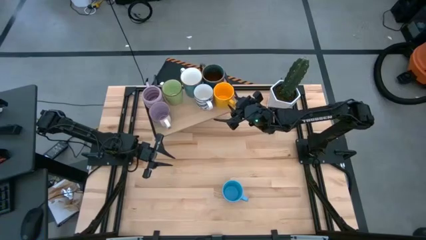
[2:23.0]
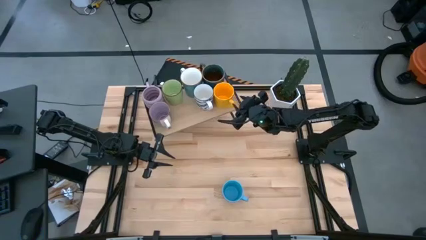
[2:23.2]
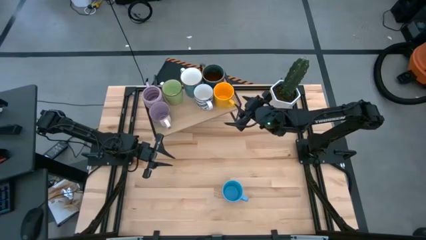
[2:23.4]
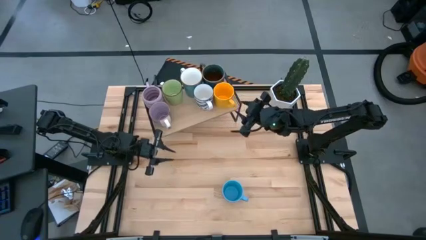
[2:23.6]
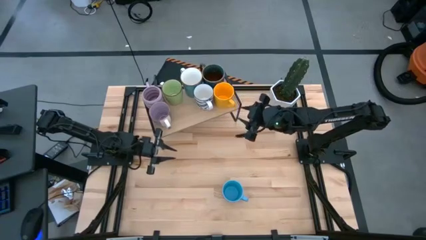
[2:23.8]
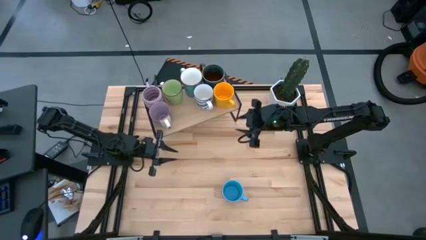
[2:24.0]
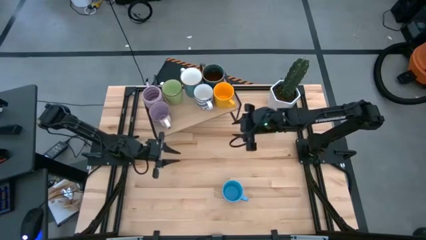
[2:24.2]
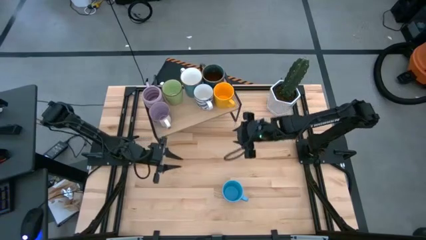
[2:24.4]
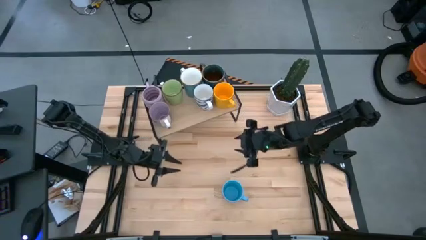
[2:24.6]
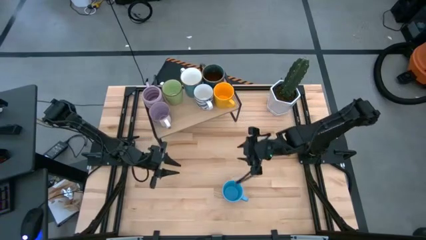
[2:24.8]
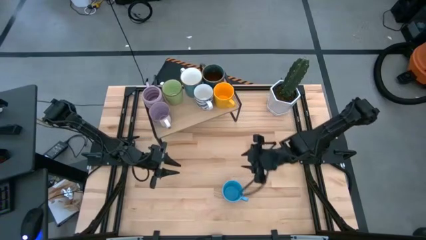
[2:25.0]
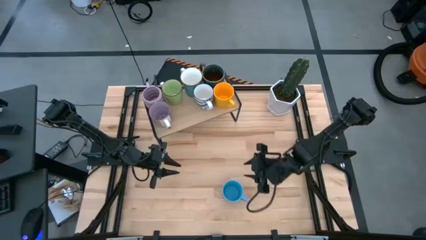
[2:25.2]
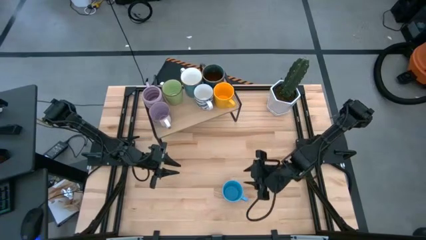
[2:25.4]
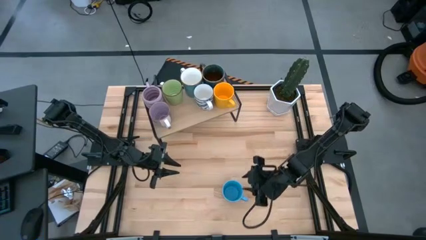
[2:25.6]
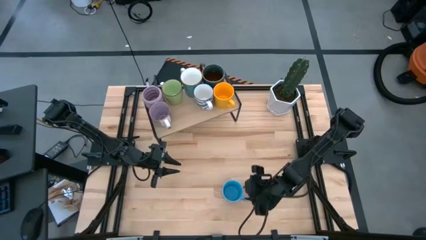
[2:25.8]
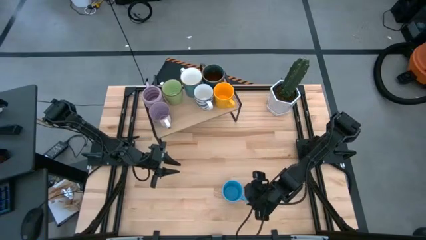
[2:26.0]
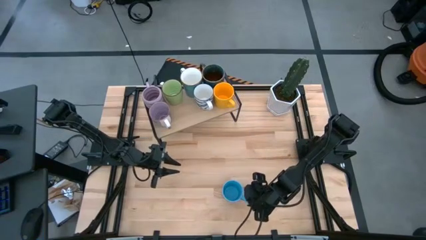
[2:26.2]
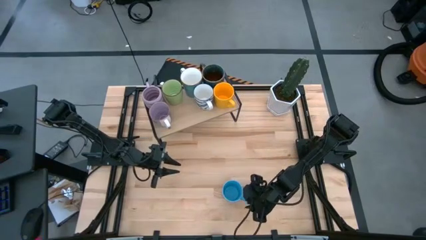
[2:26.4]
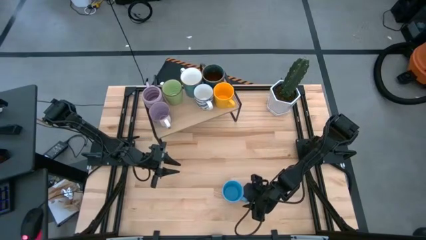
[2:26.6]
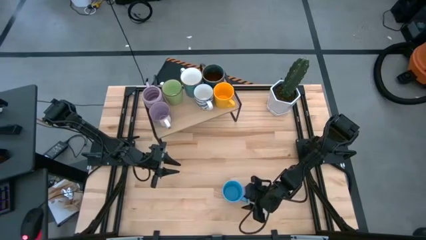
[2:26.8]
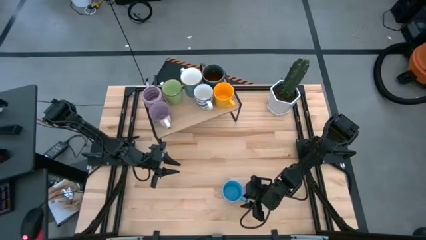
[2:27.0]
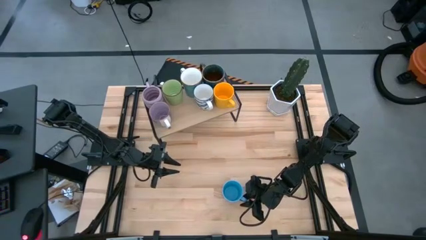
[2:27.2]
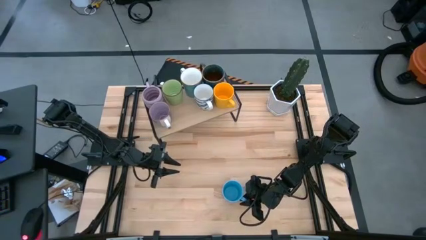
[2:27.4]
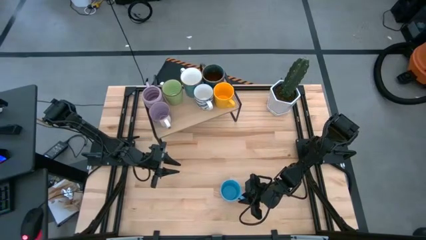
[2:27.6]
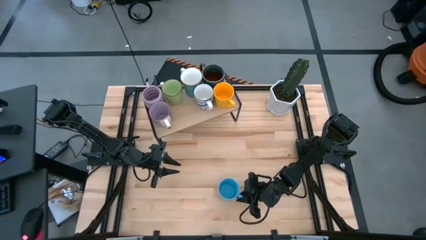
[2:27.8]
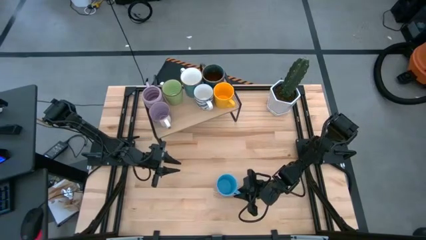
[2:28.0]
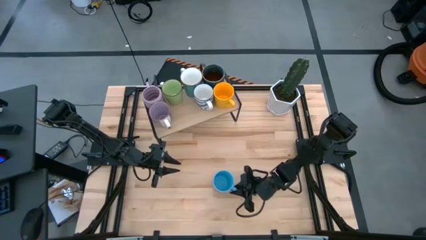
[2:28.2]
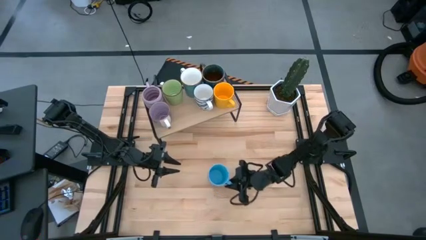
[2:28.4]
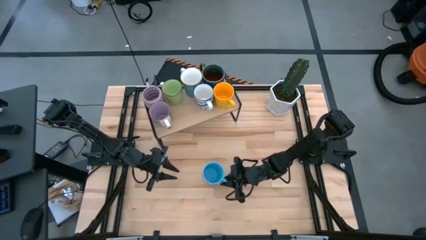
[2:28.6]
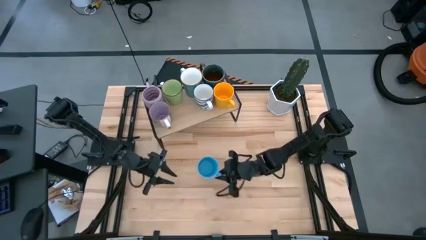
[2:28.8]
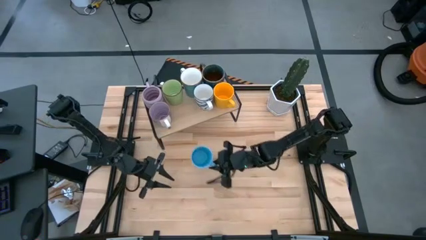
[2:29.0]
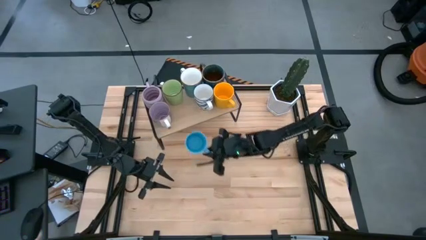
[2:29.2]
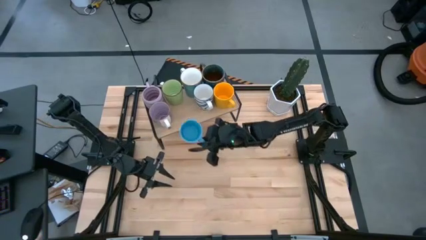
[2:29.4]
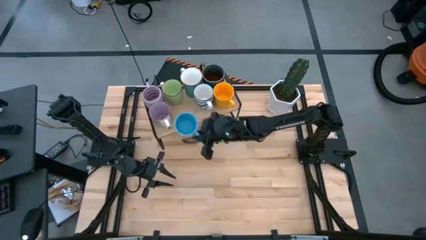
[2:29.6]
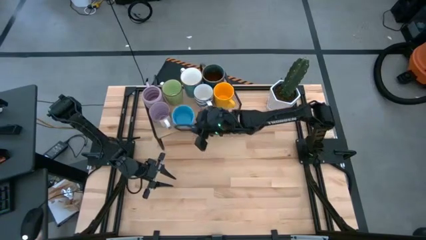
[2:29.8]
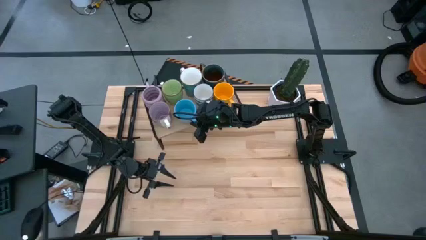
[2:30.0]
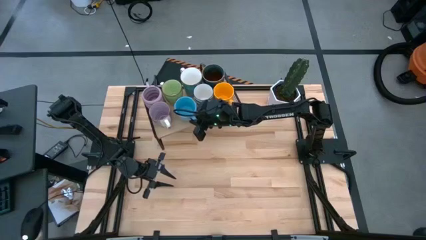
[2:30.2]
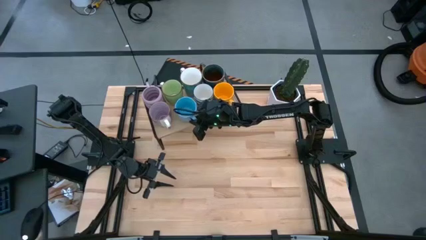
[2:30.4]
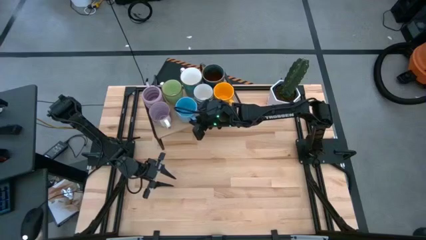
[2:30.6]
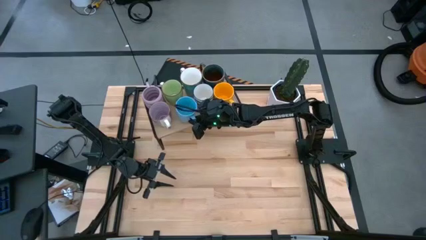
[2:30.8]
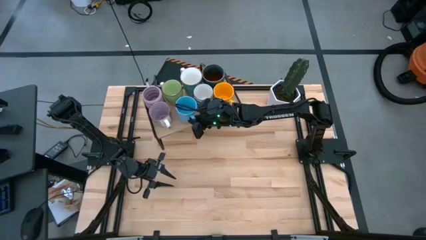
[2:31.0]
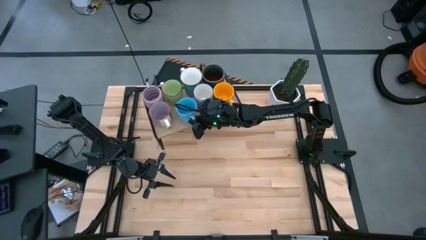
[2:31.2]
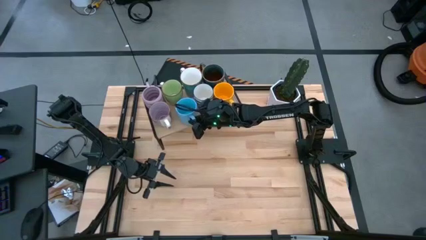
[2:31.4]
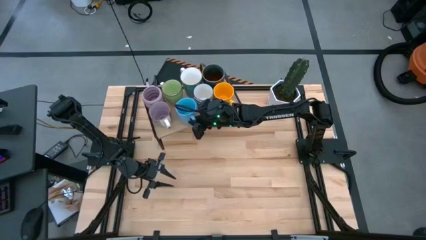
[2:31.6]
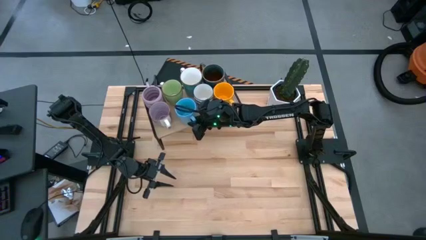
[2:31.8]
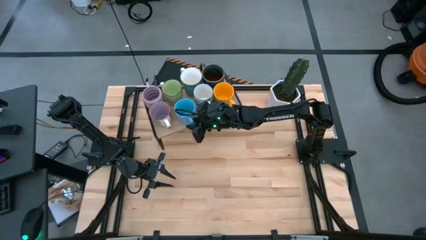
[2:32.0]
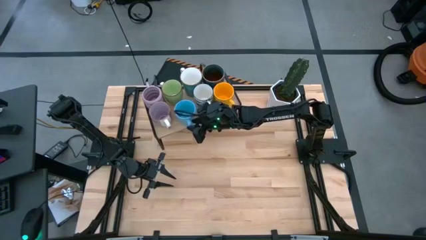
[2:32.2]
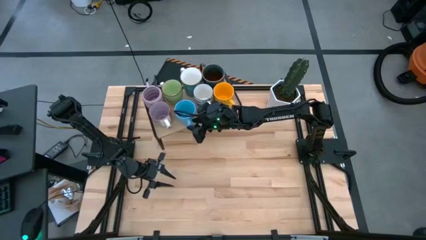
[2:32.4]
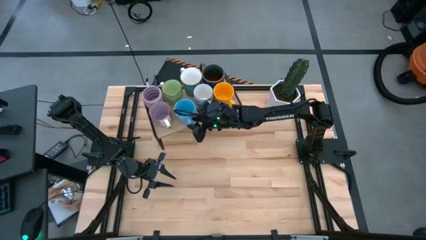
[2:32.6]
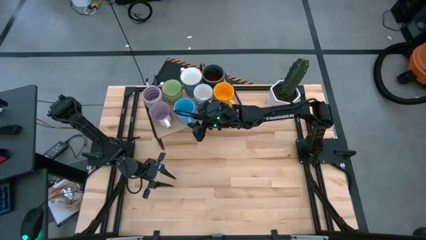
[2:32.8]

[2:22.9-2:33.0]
Task: Place coffee mugs
Put the blue mug on the shelf

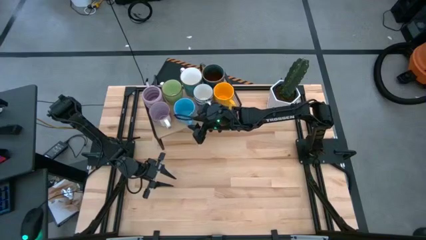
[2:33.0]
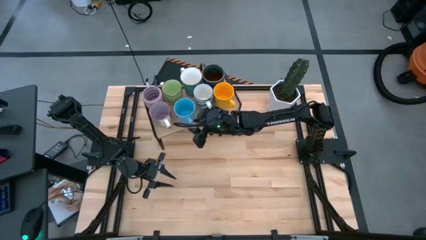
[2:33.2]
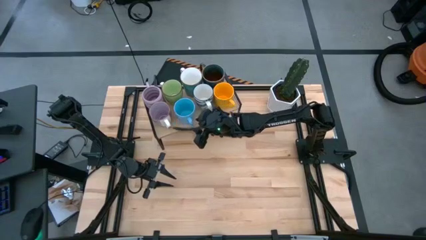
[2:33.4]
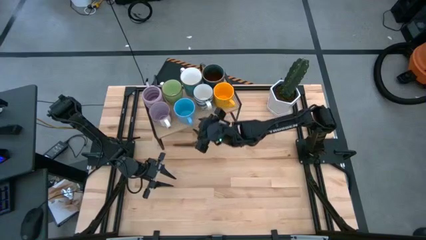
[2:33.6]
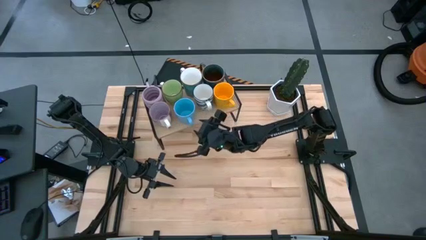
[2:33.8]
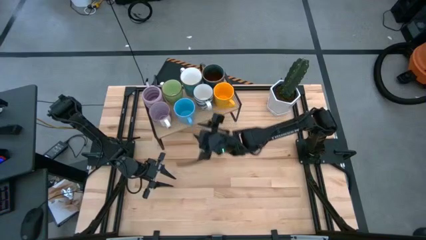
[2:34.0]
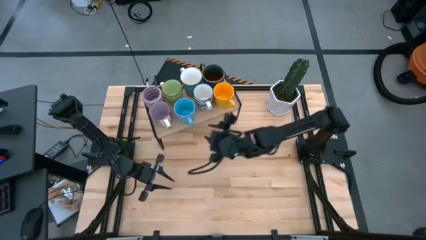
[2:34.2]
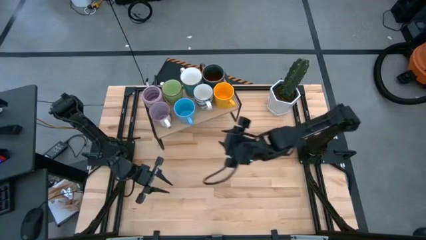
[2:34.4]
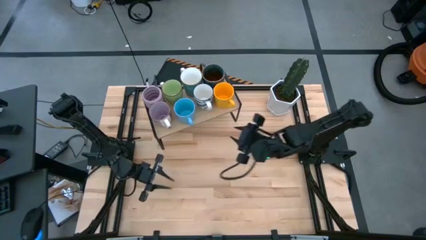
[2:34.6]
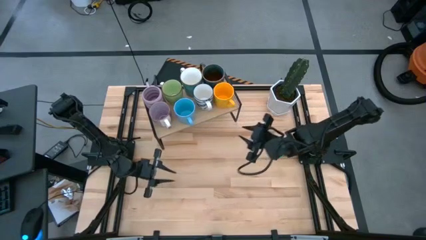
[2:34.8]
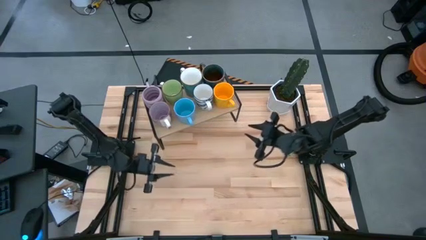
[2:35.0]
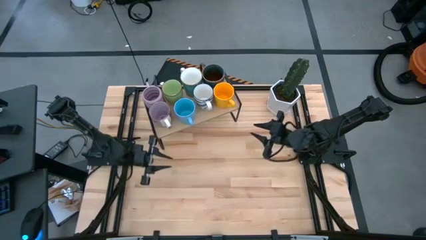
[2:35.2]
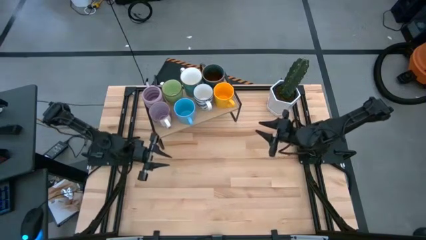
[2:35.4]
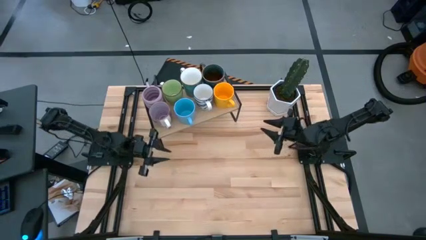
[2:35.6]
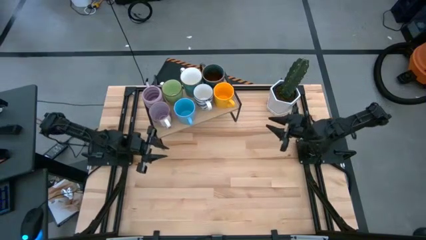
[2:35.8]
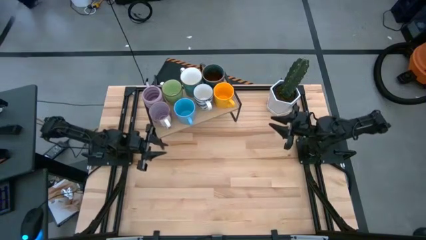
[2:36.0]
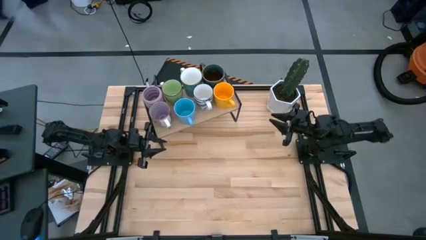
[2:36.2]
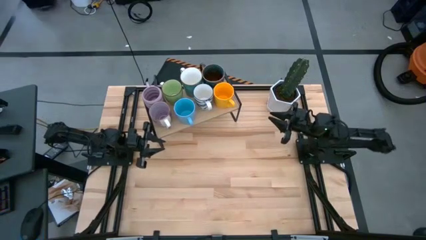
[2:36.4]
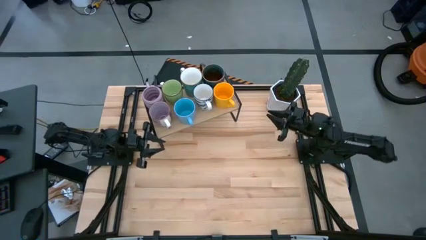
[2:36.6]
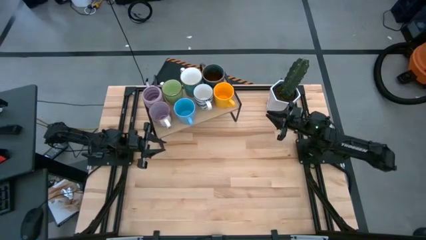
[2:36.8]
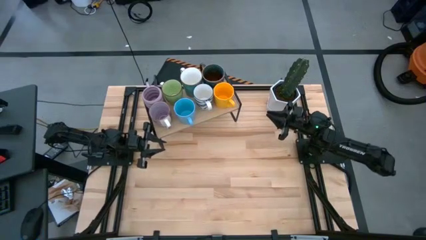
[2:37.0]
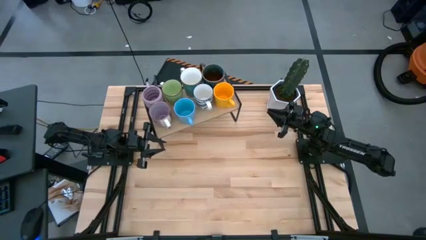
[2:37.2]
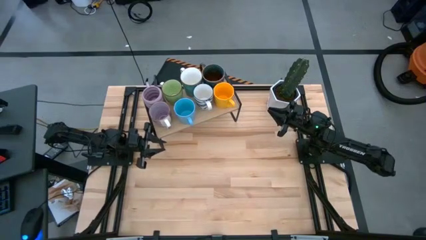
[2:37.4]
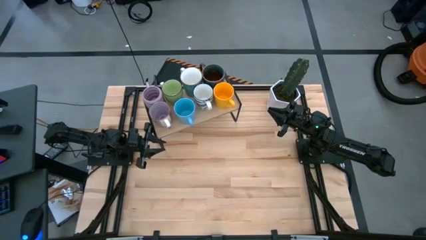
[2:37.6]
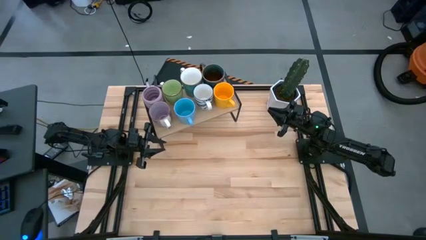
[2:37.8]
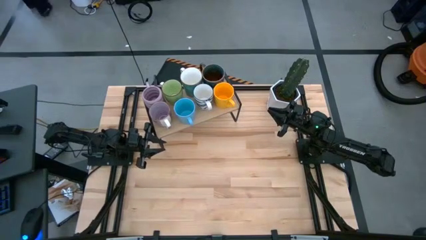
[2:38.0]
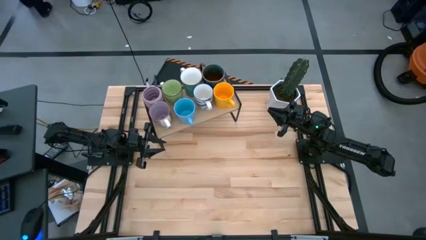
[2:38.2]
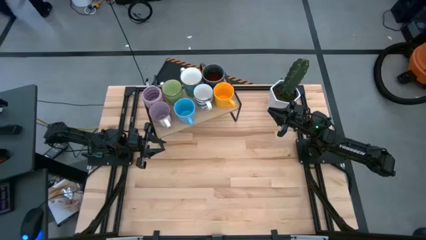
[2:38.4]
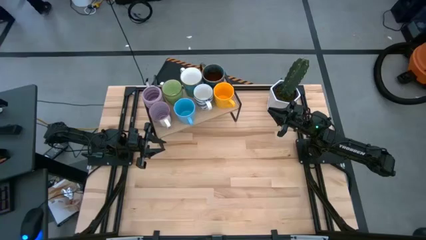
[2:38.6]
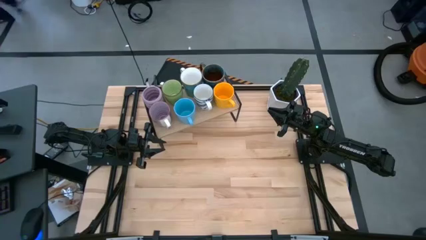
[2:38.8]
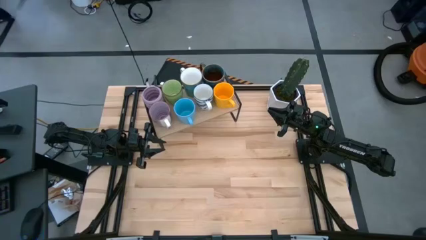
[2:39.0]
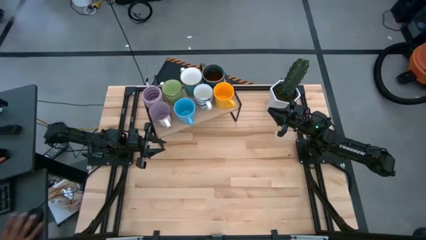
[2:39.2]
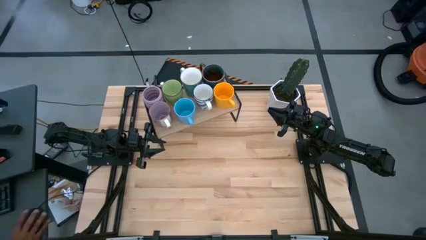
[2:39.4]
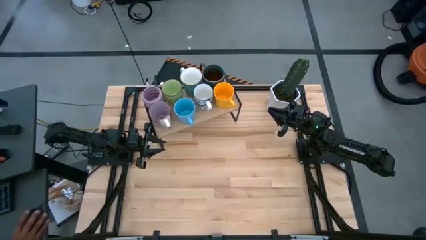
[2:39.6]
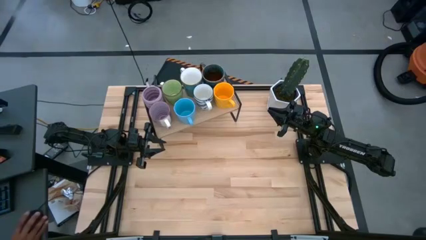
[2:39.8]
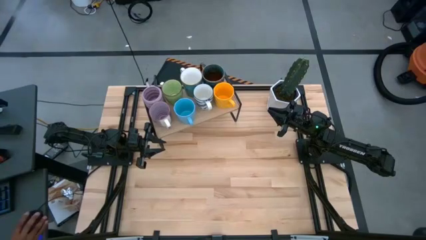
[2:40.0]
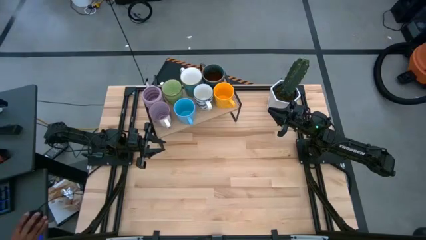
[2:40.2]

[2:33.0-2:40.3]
Return to Home Position
